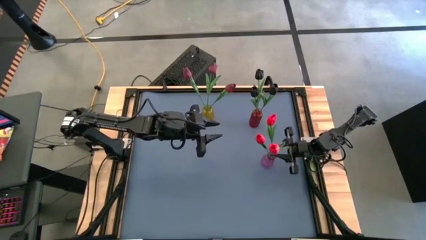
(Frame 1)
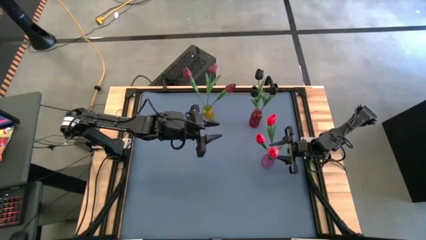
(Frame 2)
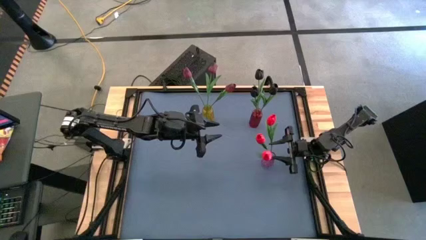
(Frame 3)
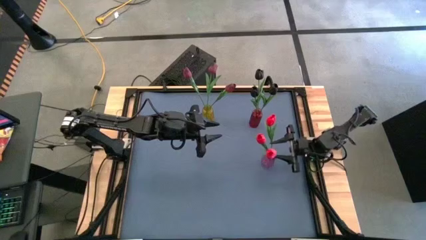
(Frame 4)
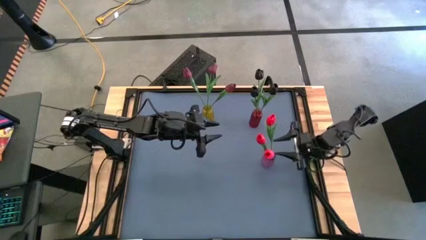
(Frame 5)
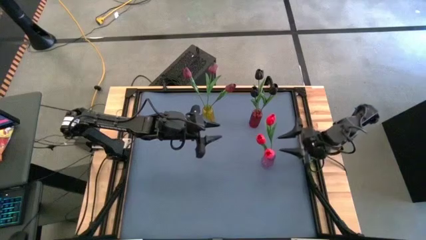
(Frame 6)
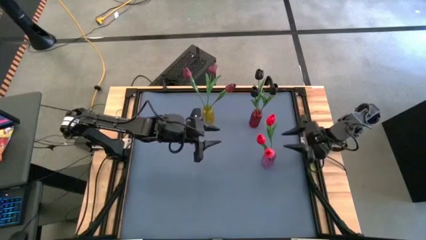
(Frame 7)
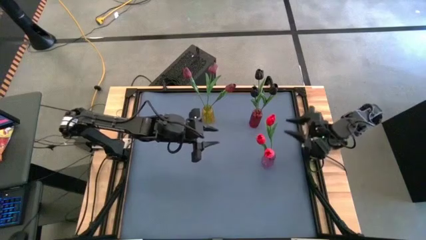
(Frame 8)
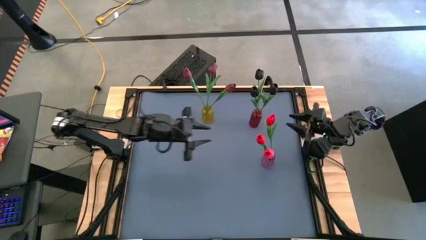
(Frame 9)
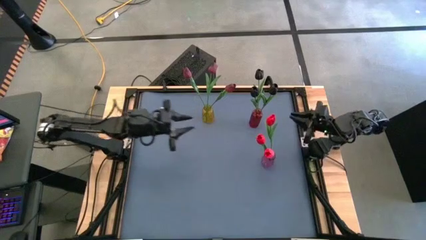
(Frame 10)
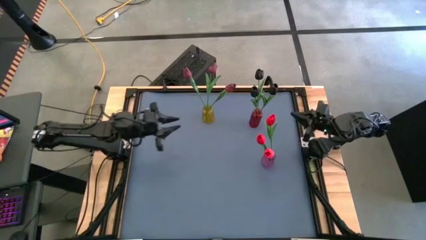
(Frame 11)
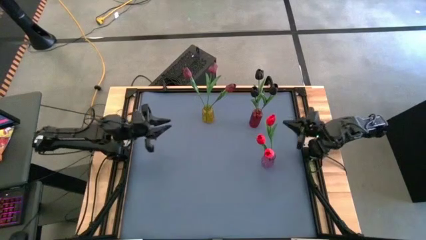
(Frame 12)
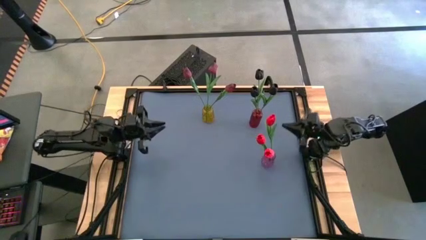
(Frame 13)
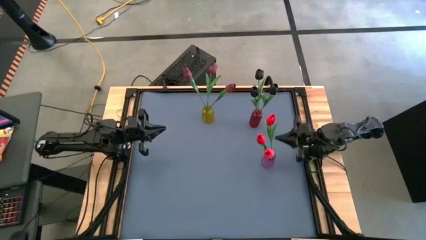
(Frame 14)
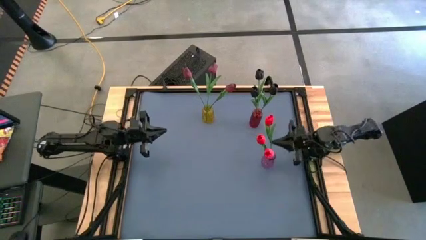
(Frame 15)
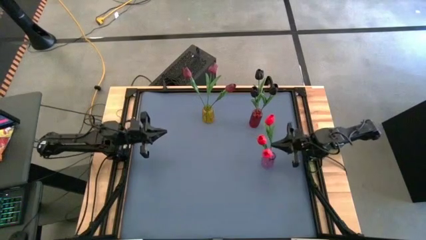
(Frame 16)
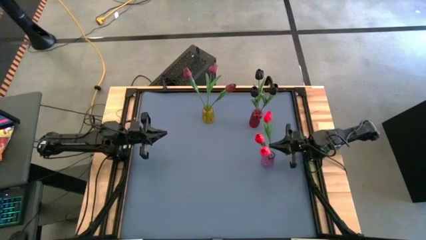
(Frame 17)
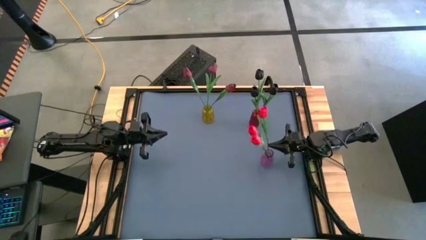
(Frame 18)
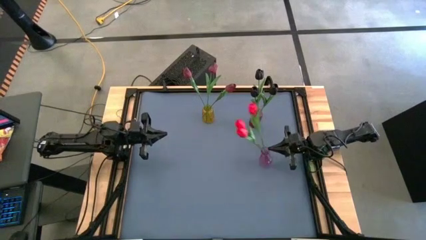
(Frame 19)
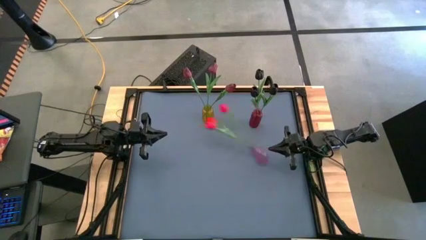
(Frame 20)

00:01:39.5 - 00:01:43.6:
Task: Sort flowers into vase by color
Return to Home Position

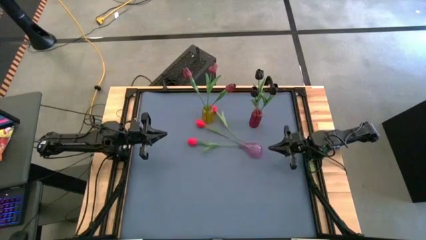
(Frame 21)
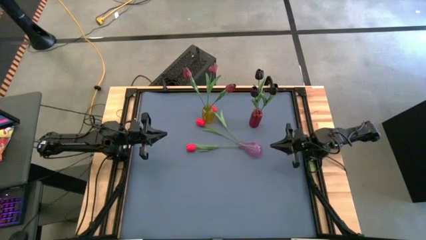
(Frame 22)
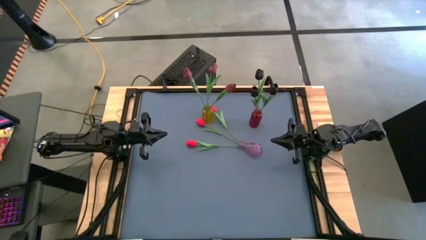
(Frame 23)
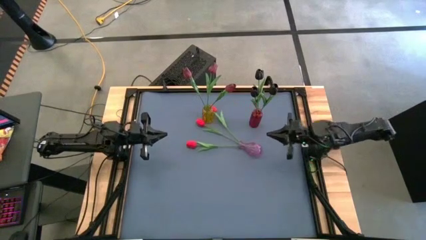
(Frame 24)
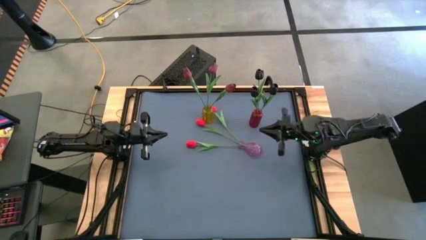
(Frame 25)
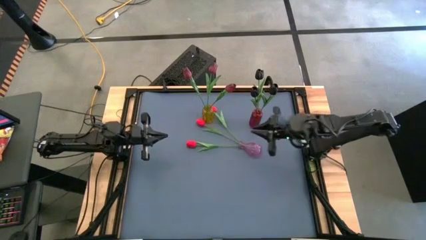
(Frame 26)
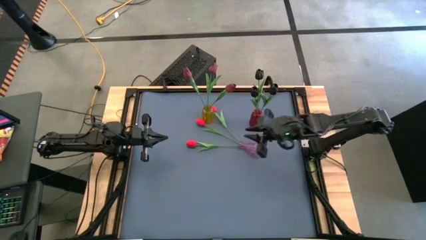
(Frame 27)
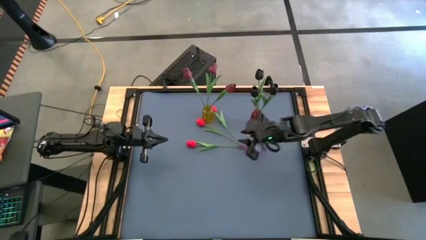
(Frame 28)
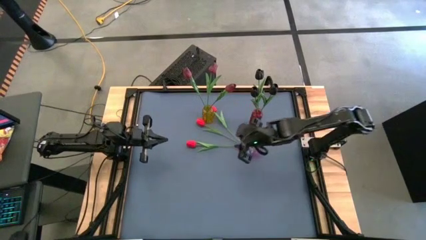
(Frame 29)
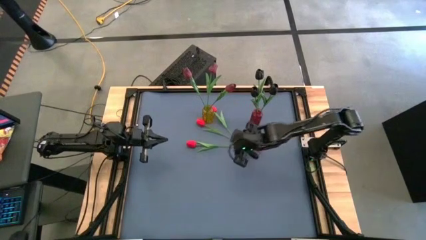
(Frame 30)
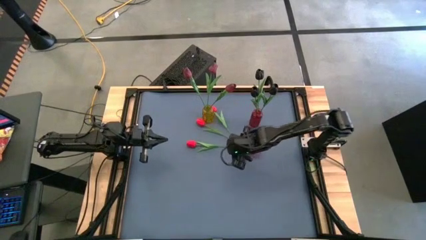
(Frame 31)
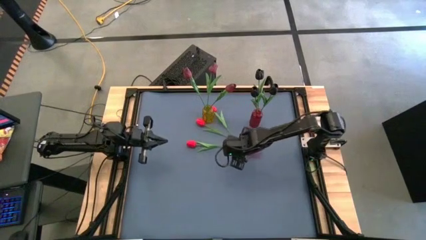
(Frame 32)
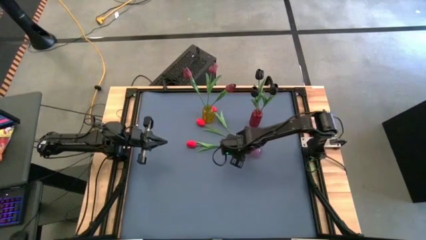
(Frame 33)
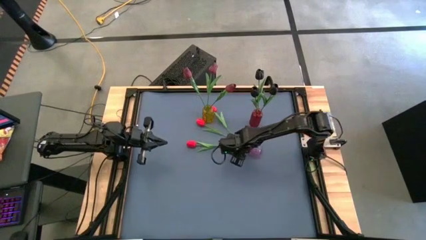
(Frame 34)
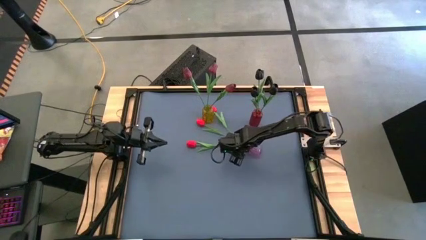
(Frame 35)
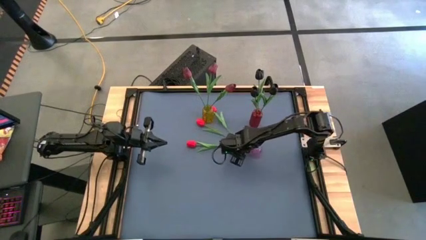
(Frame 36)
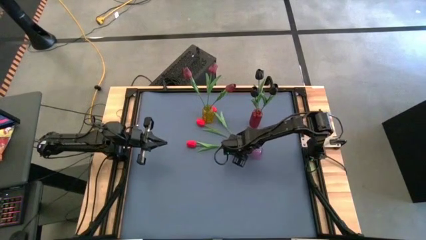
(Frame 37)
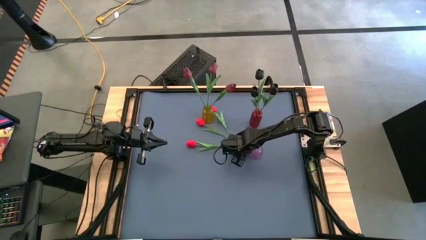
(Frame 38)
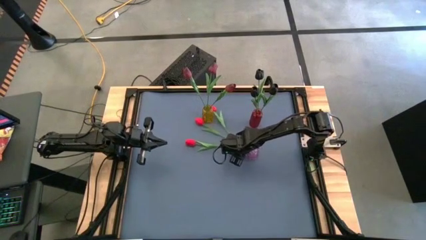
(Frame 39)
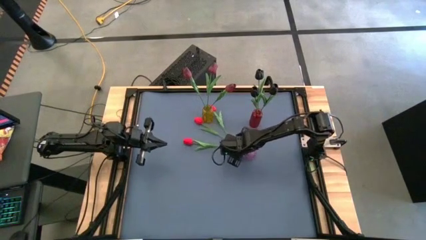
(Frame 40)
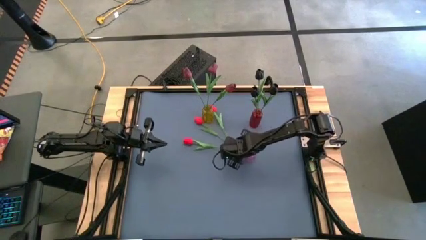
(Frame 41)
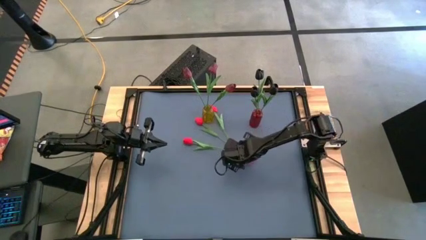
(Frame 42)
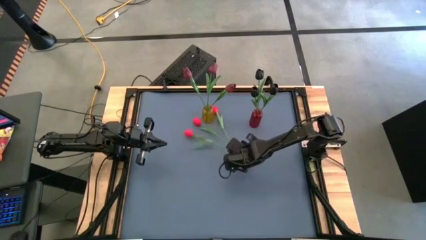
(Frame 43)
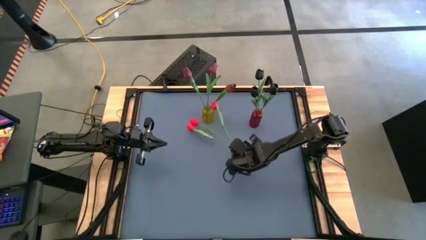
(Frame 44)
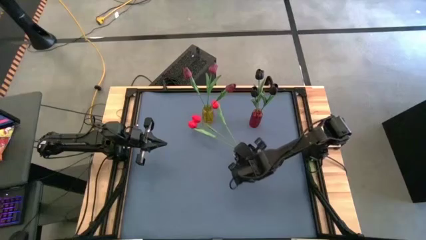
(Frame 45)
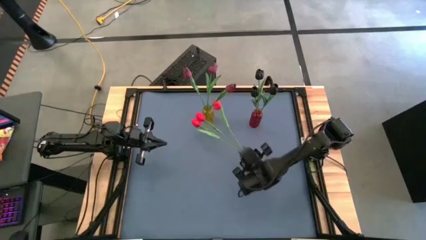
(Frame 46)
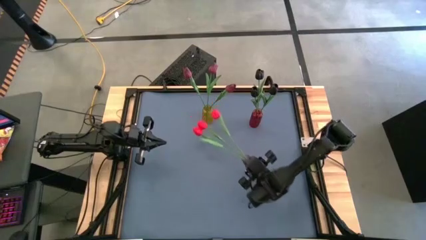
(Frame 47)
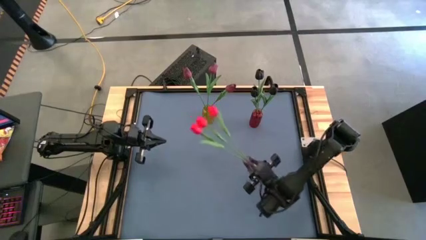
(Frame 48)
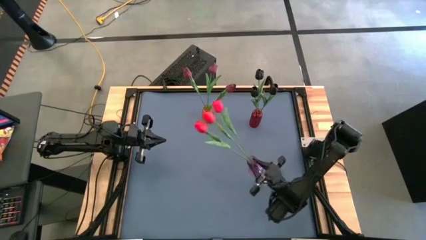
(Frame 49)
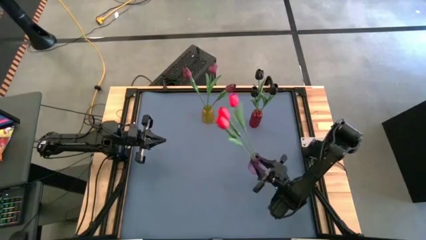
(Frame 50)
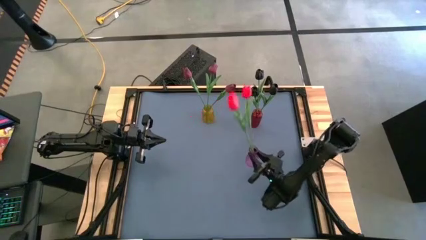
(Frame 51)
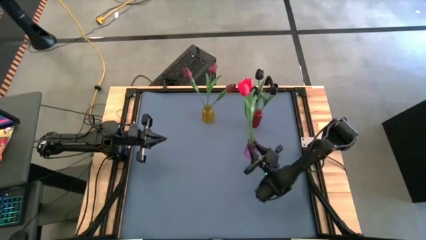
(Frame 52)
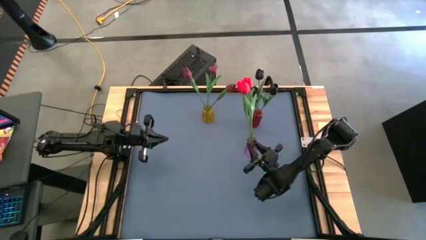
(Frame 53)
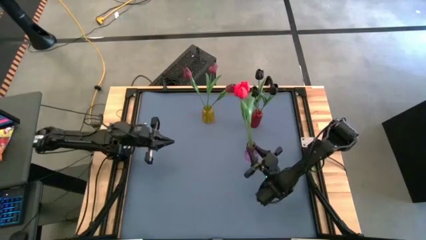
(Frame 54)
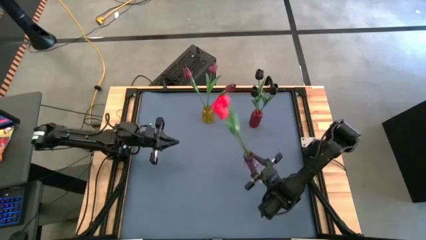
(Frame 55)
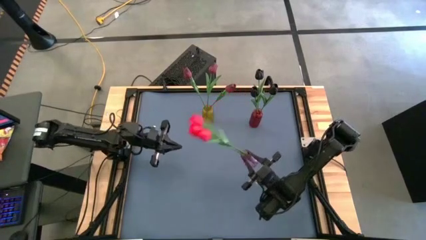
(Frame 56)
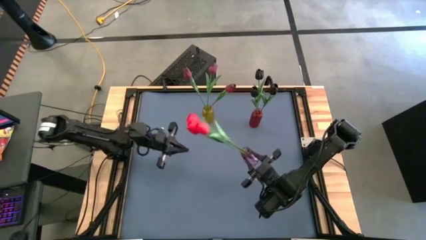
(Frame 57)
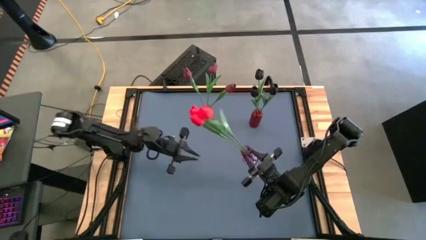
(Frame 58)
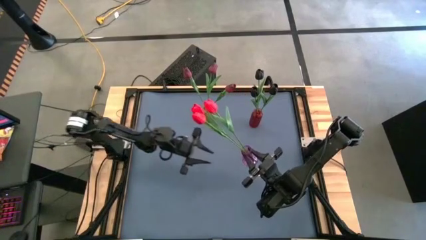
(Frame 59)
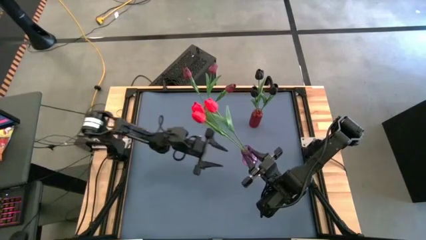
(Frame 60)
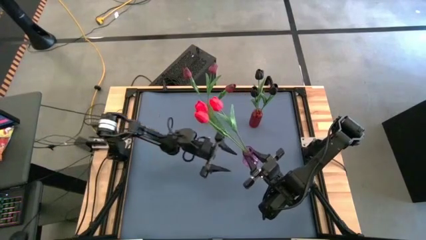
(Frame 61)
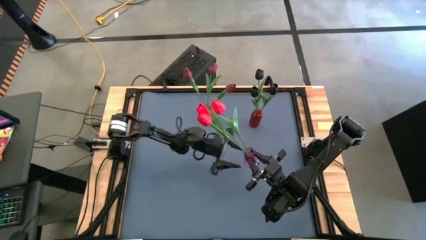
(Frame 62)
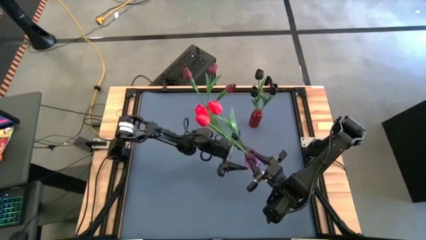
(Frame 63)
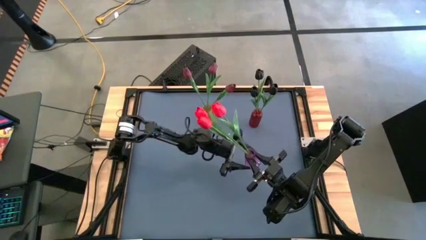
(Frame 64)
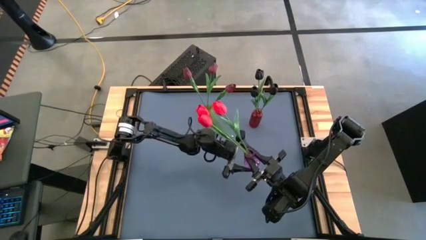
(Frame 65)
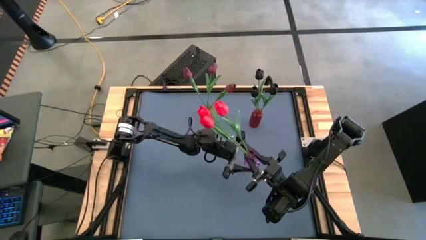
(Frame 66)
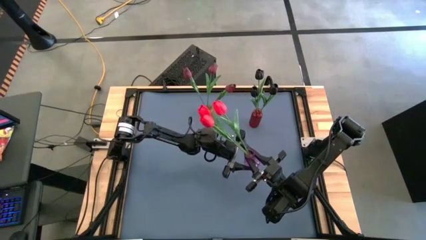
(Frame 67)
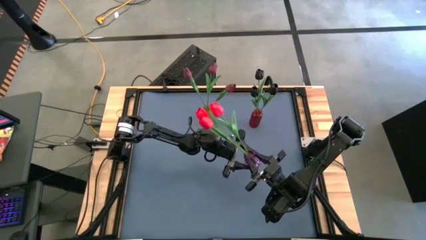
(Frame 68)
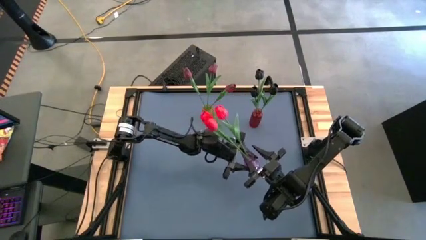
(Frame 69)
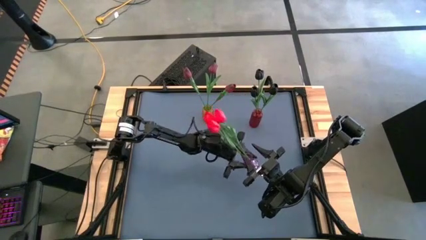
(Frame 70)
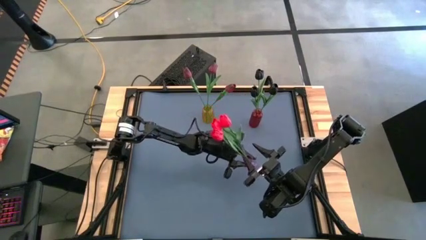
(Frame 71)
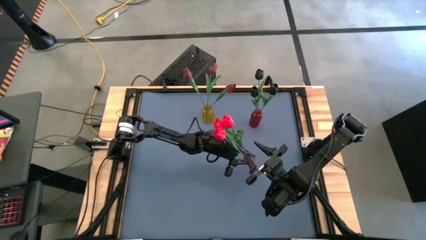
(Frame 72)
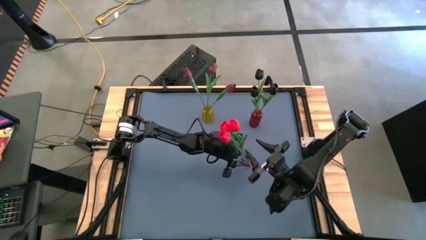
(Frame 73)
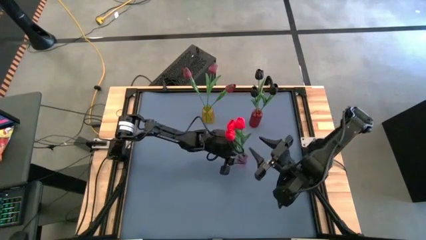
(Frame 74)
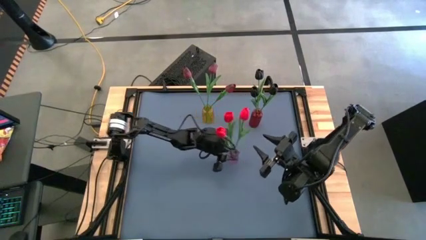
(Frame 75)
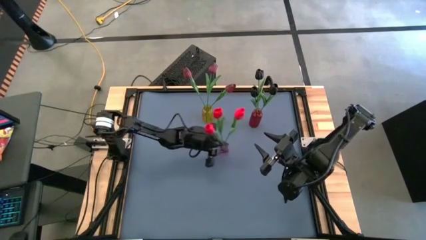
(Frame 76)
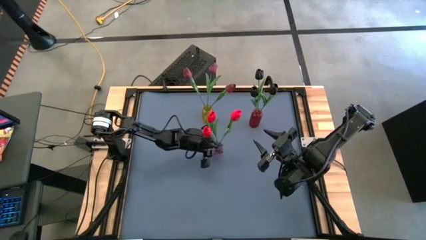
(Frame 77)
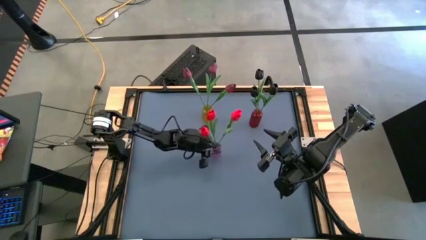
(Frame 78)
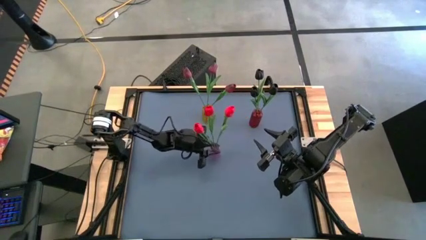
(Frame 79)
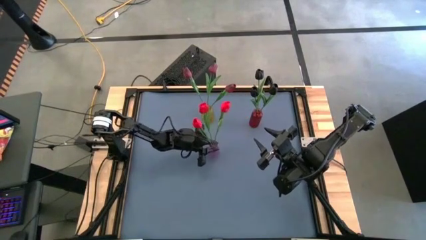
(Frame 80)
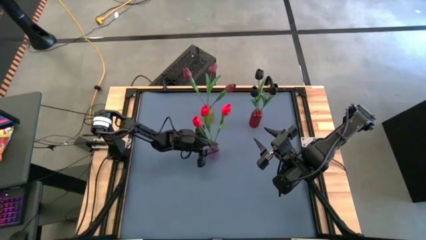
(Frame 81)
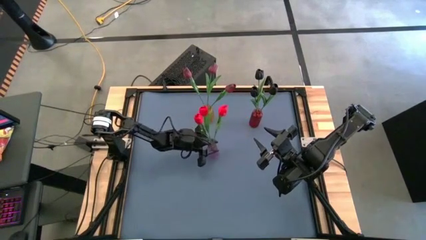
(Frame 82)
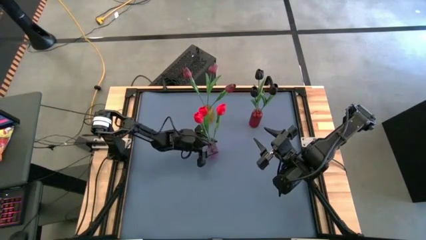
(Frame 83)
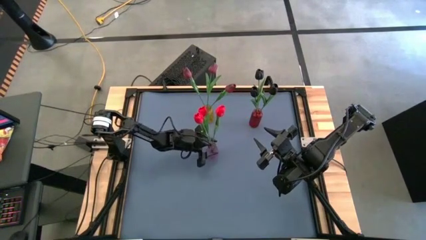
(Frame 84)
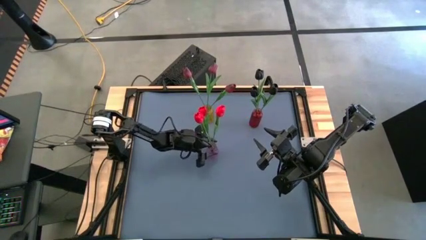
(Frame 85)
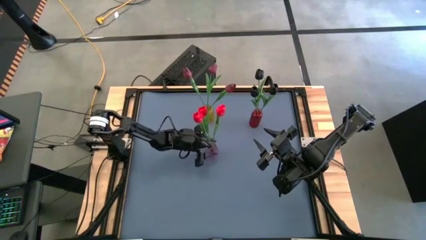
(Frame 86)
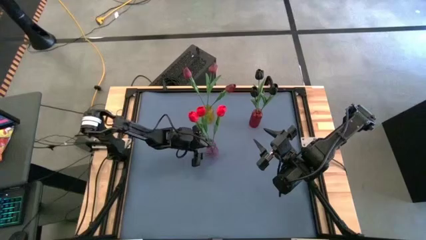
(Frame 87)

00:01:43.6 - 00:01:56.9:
Move the purple flower vase to the center of the table
